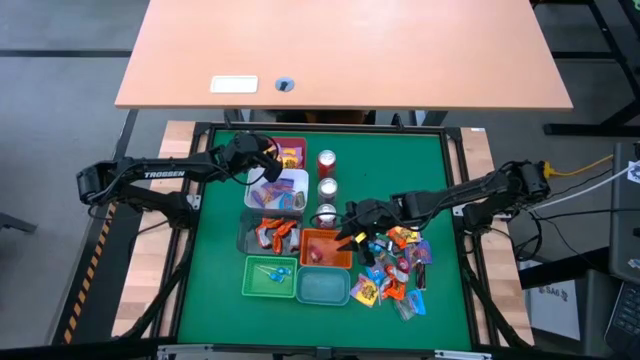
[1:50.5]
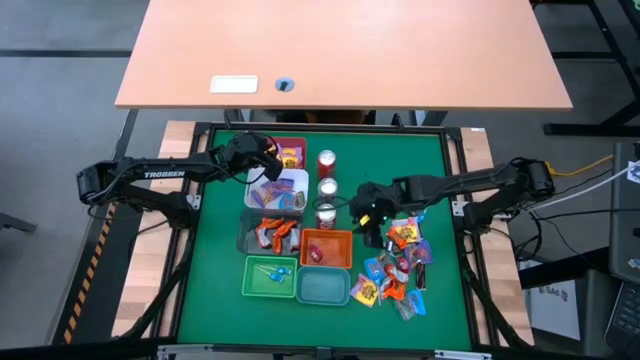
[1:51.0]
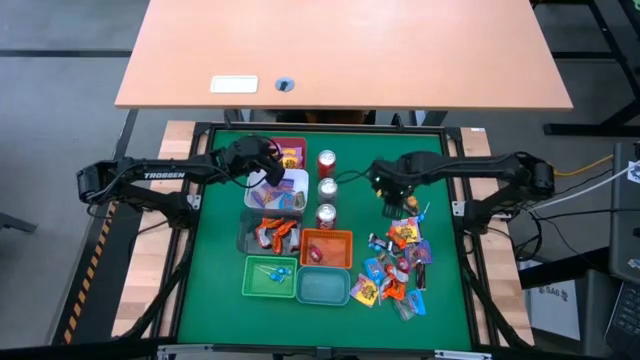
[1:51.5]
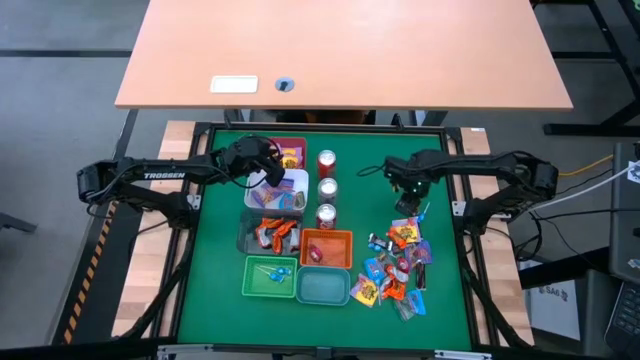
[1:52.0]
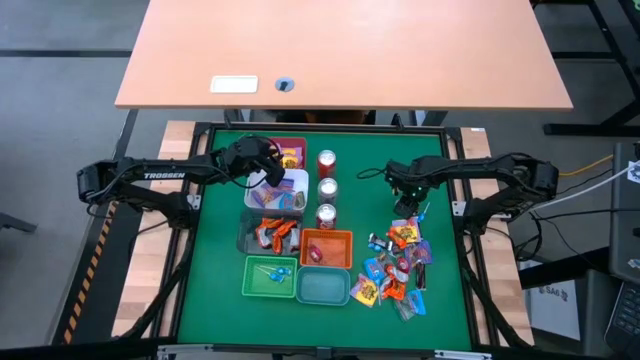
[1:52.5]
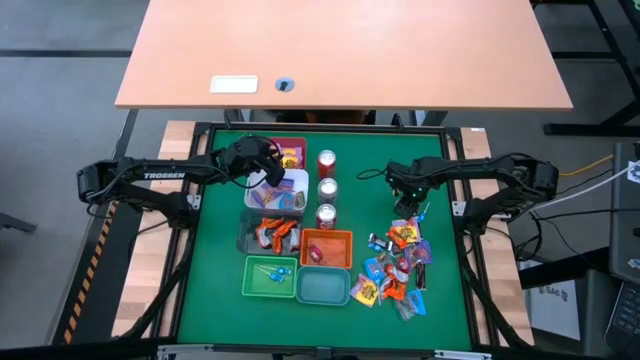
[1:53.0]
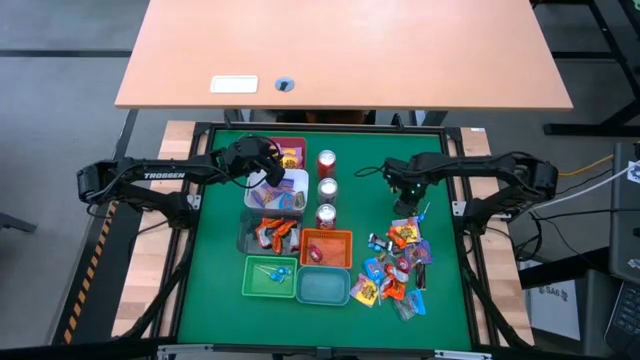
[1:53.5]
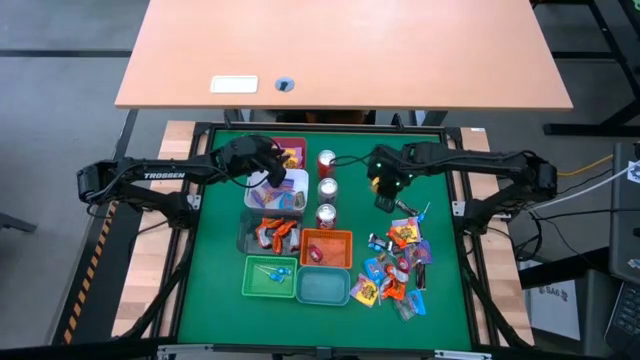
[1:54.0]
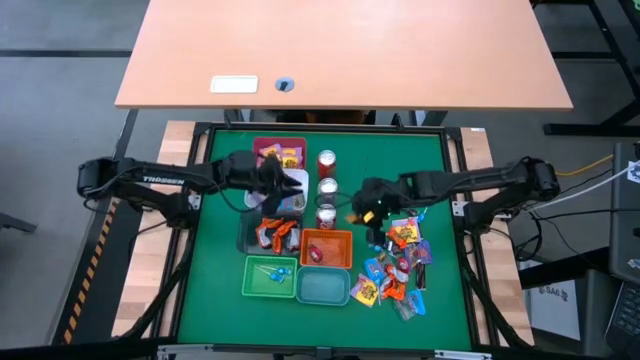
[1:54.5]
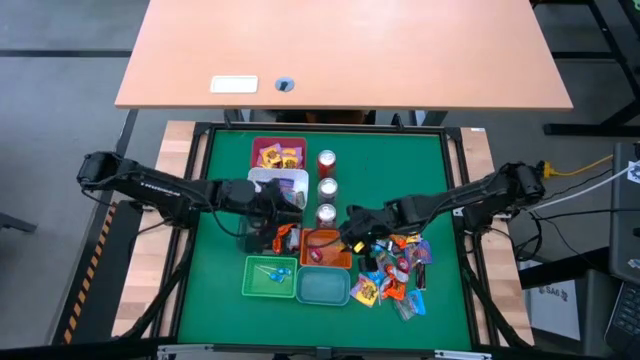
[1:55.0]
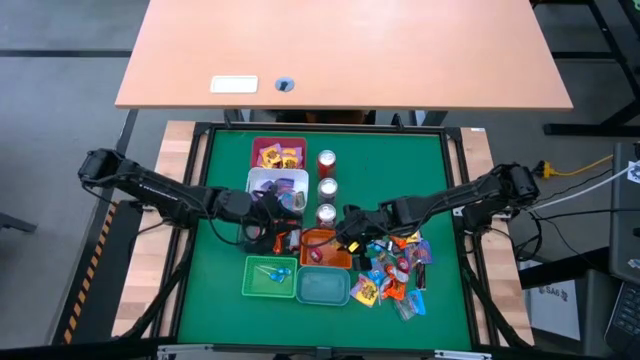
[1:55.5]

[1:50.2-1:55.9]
Task: Sort candy
Put the gold candy into the center orange bin

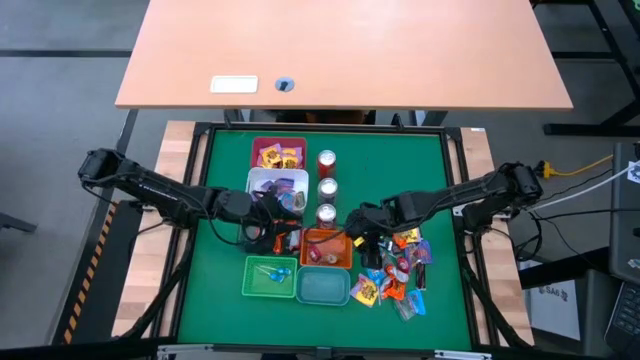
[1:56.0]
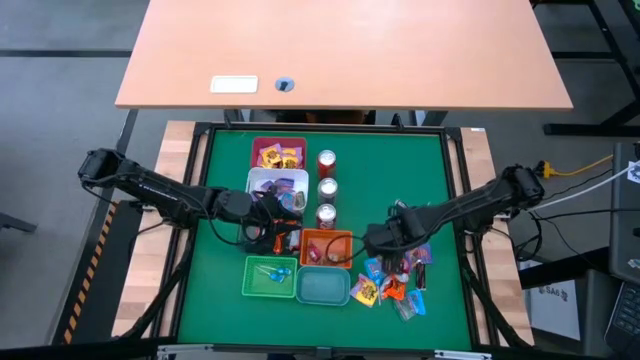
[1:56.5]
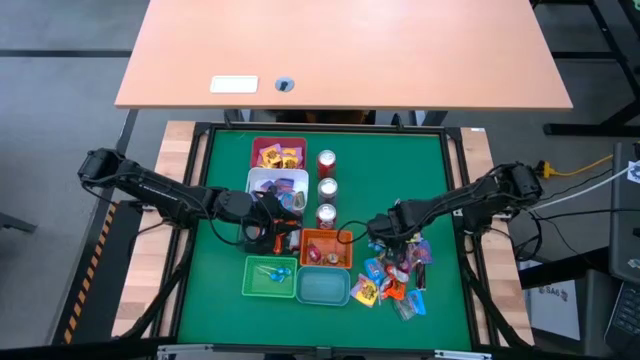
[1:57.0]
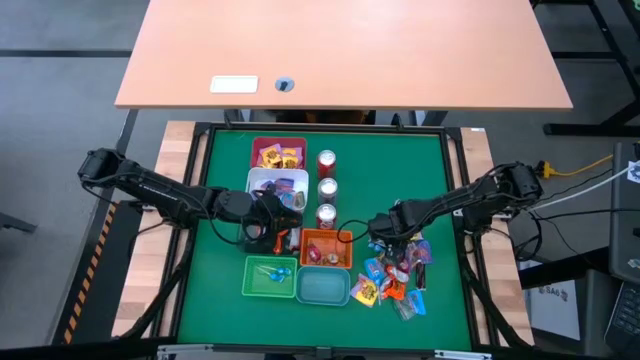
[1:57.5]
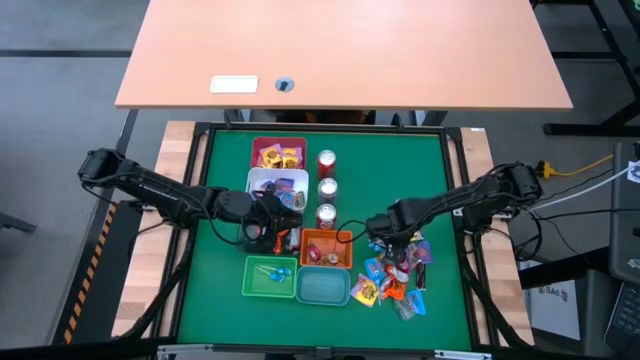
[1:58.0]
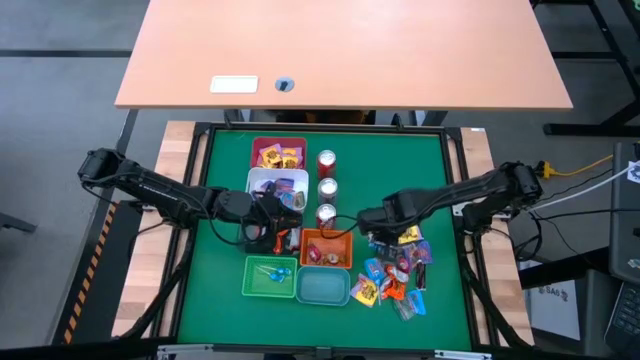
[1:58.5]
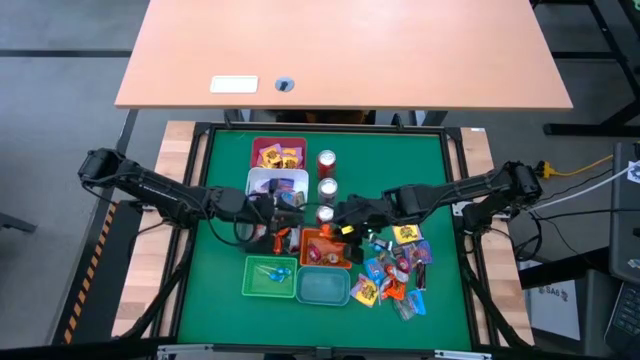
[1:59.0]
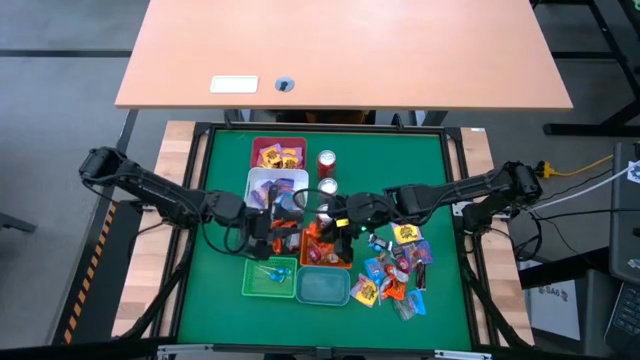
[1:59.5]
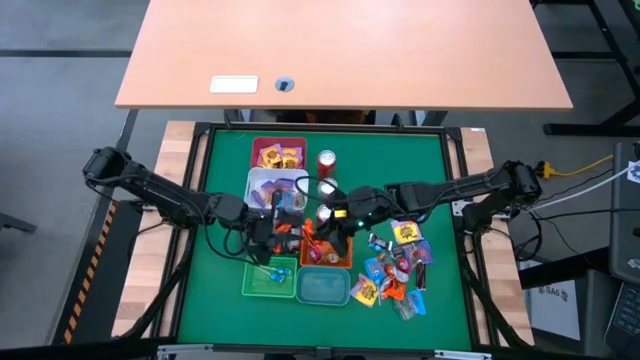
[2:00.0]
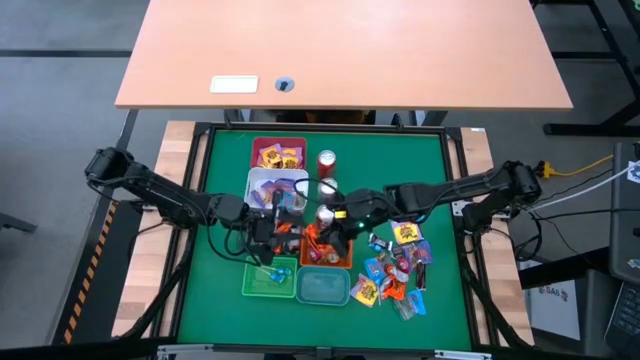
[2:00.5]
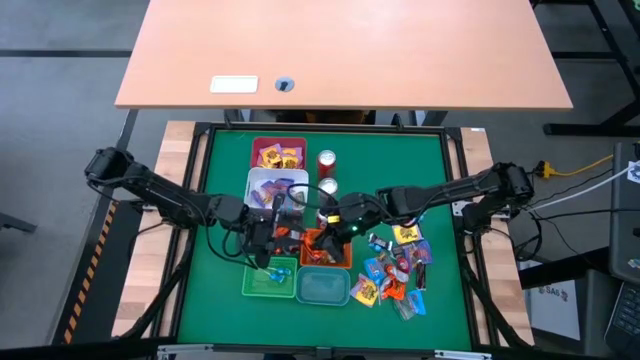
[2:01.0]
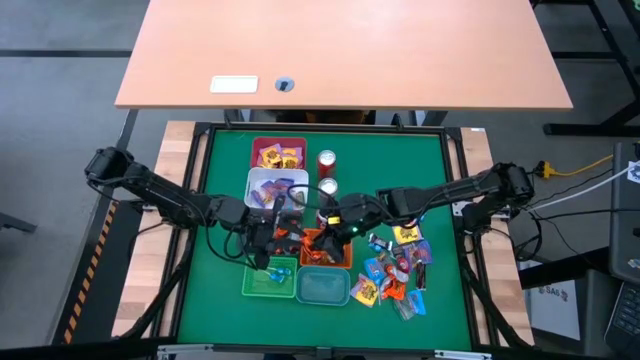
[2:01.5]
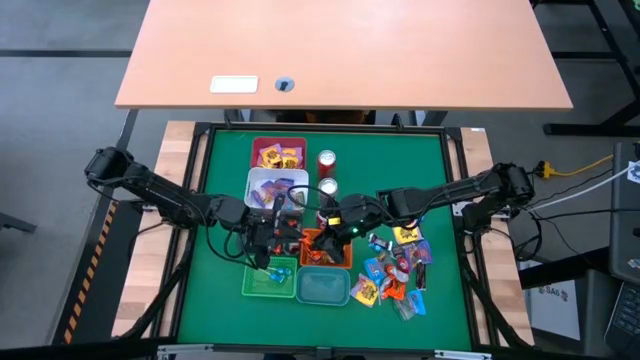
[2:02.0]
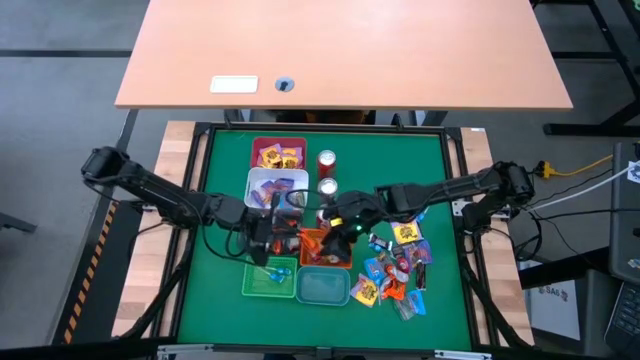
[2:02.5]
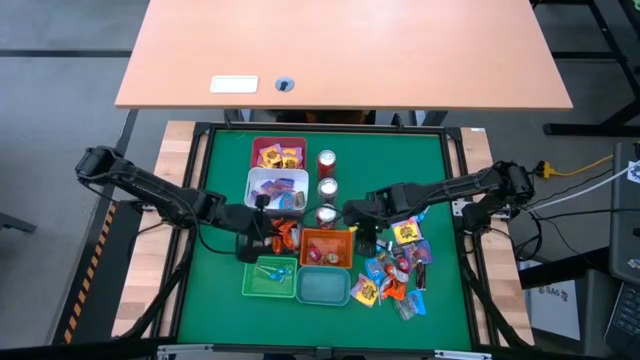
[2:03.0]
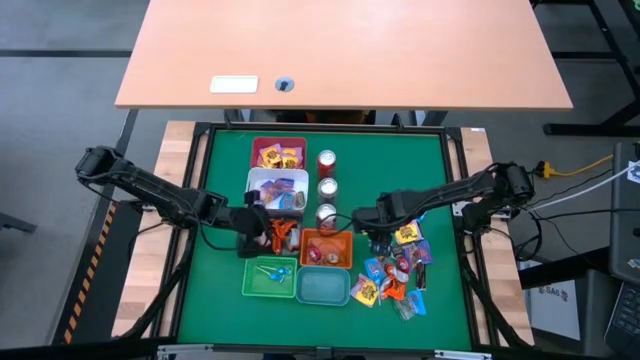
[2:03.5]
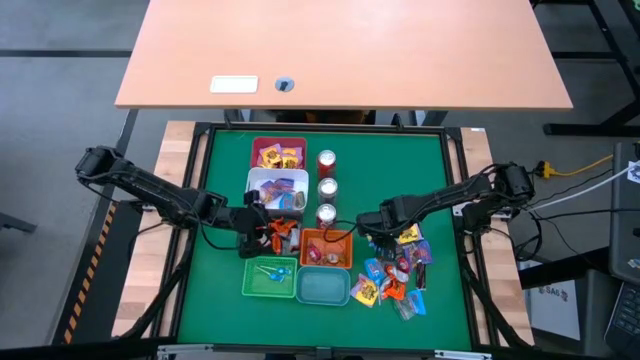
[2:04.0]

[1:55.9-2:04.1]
Put the orange chocolate into the black bin

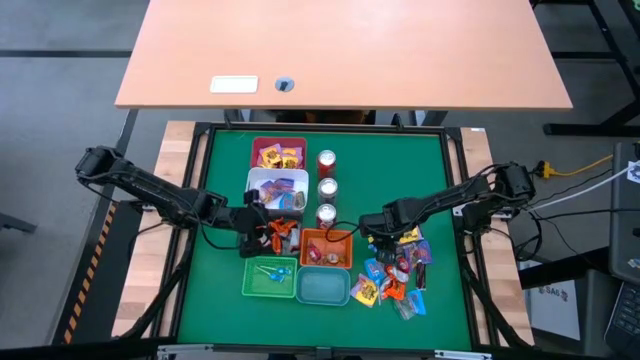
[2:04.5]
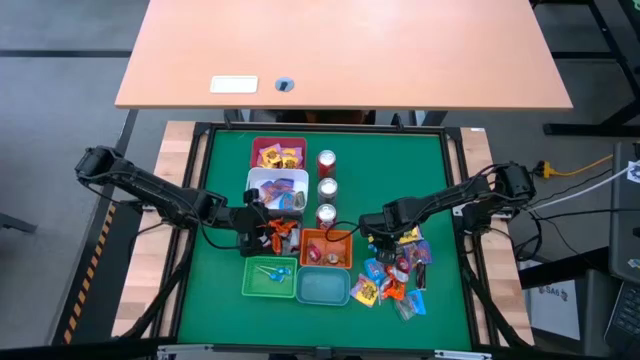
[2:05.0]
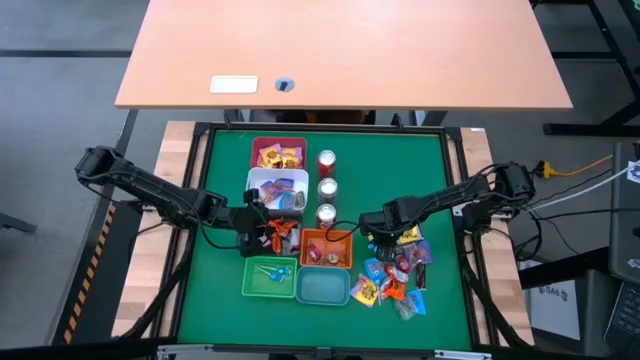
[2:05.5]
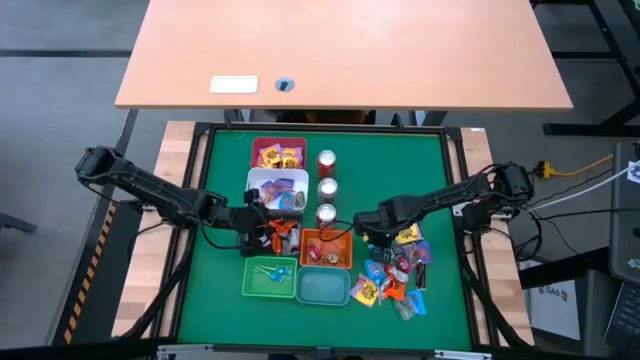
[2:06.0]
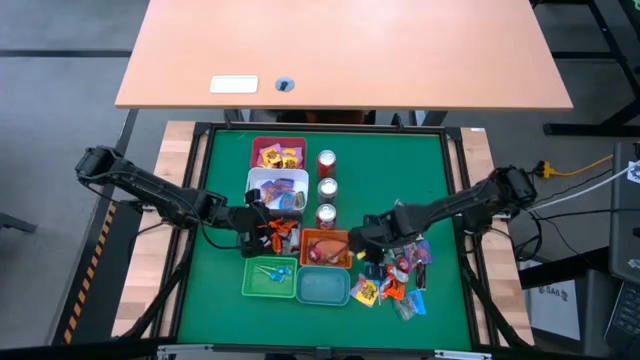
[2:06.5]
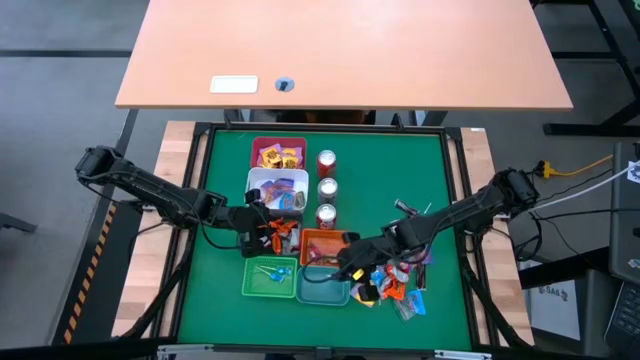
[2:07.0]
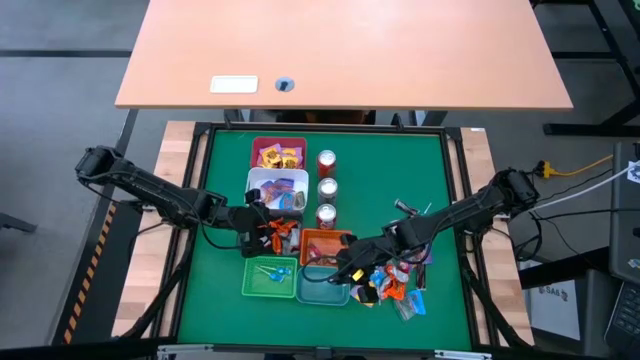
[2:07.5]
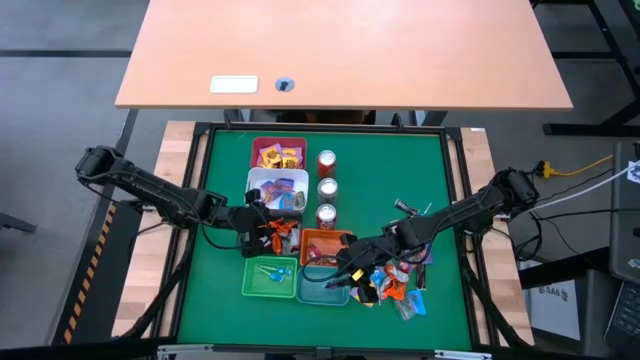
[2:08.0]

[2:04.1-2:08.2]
Put the brown candy into the teal green bin

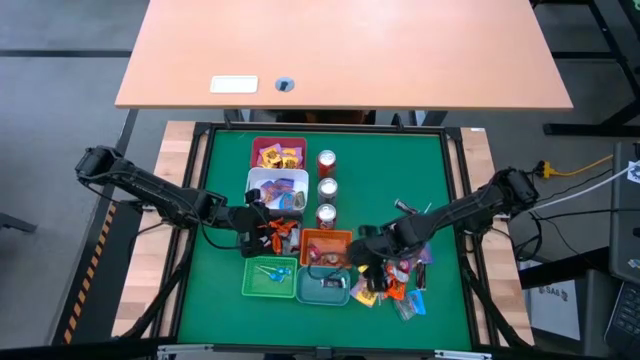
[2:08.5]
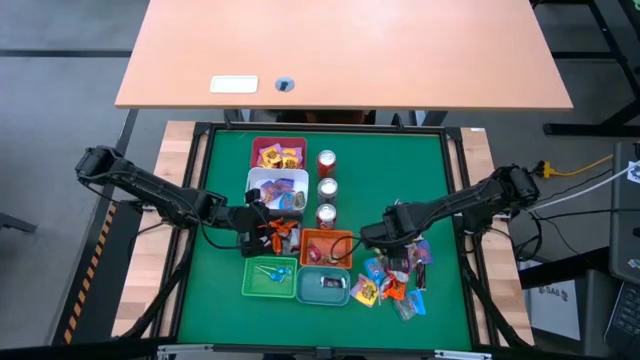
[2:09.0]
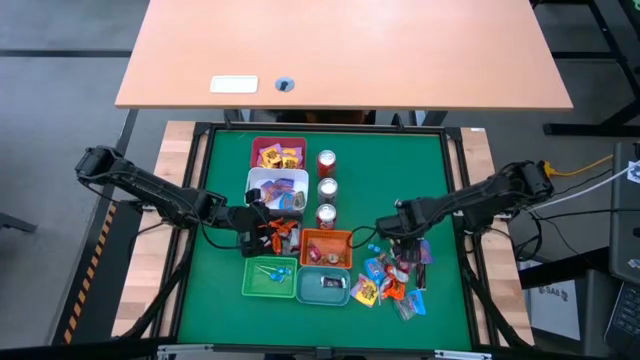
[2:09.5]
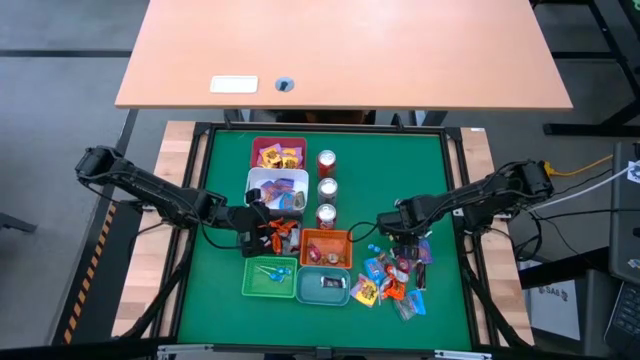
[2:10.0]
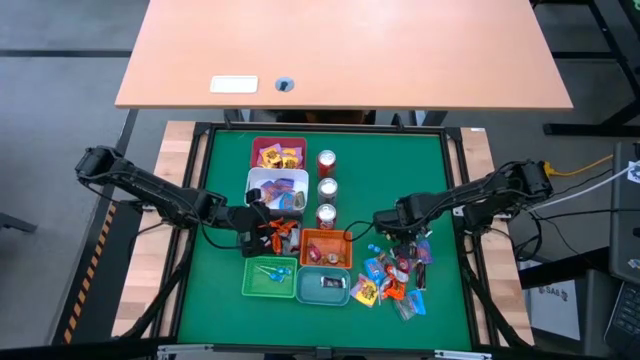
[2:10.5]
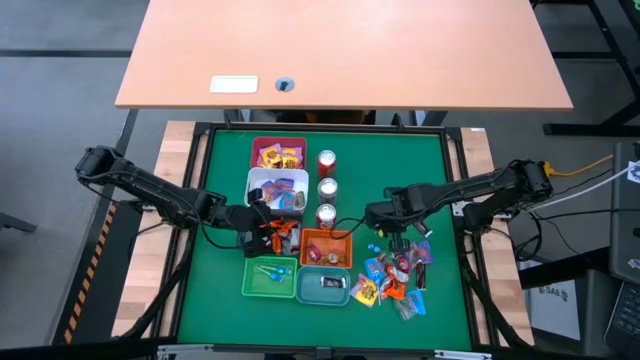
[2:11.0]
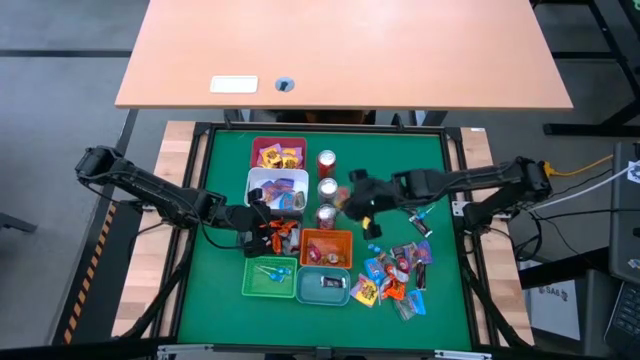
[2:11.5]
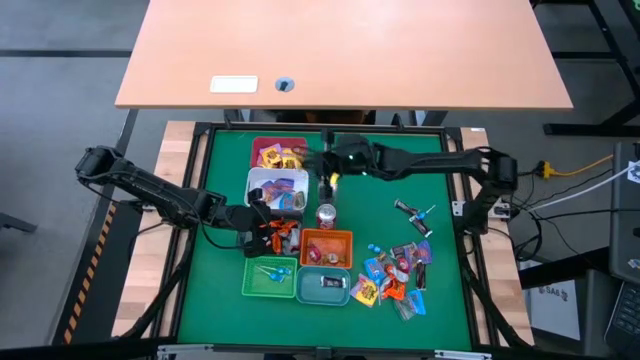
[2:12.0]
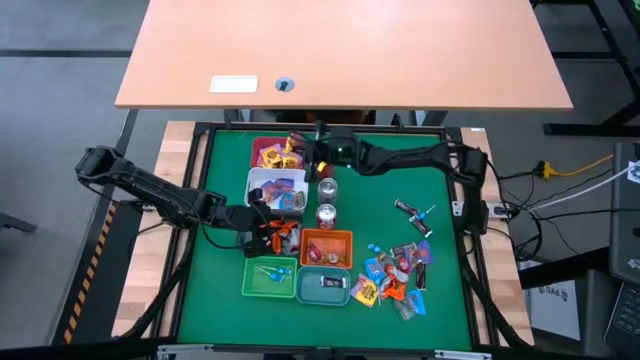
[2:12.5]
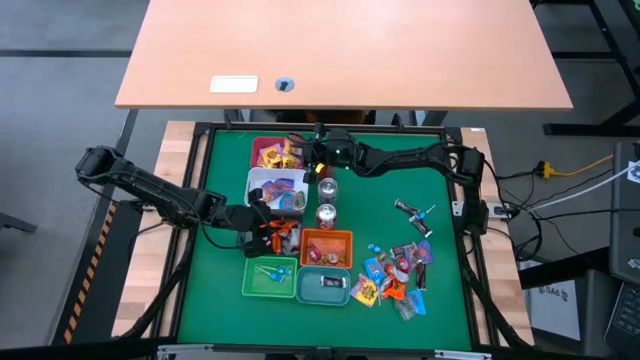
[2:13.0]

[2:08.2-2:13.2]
Put the yellow candy into the red bin
